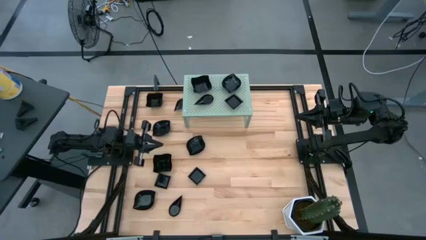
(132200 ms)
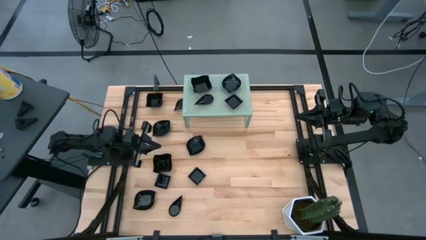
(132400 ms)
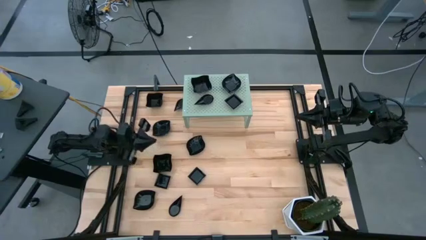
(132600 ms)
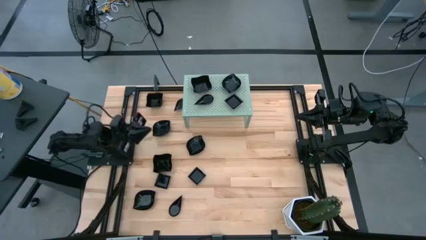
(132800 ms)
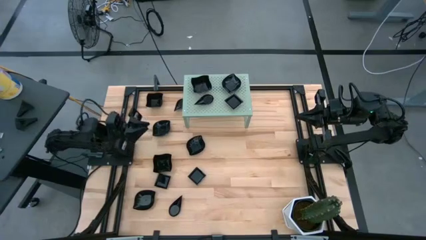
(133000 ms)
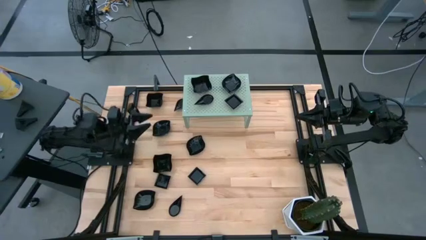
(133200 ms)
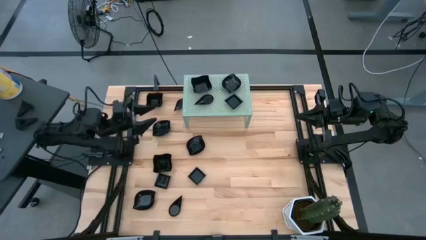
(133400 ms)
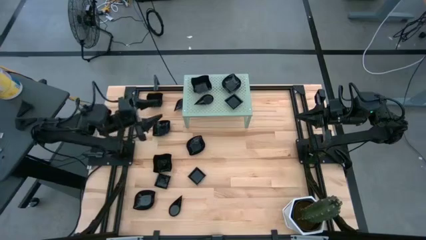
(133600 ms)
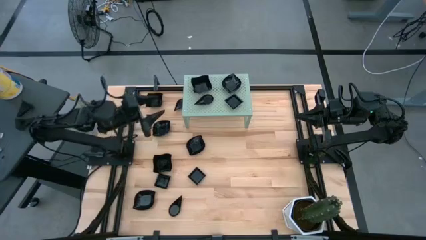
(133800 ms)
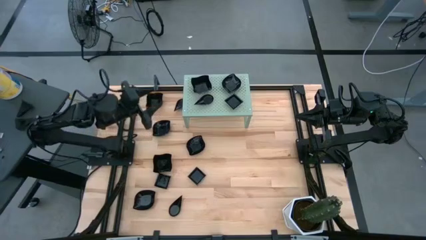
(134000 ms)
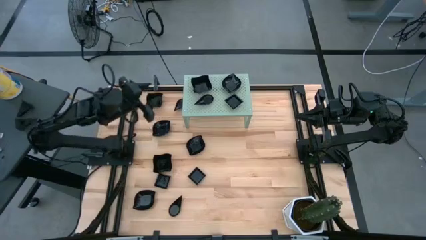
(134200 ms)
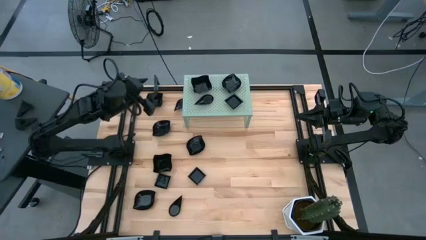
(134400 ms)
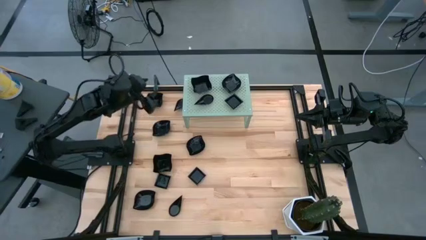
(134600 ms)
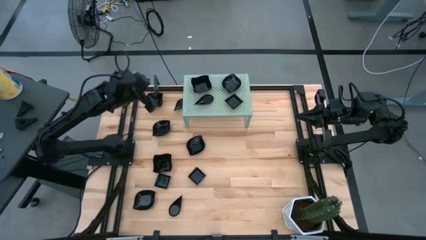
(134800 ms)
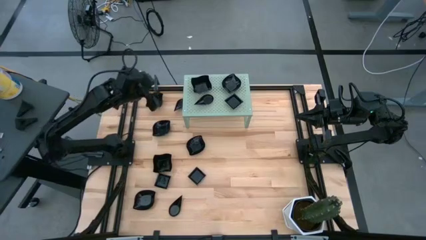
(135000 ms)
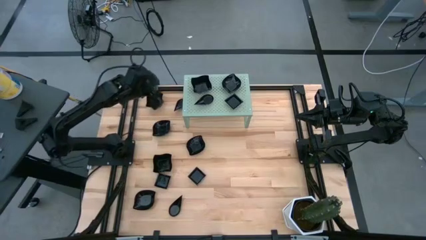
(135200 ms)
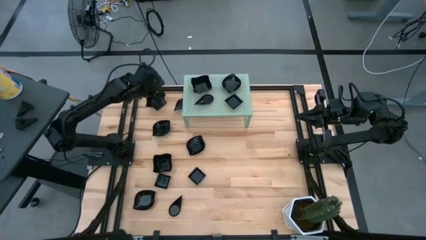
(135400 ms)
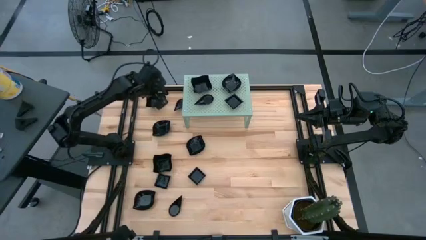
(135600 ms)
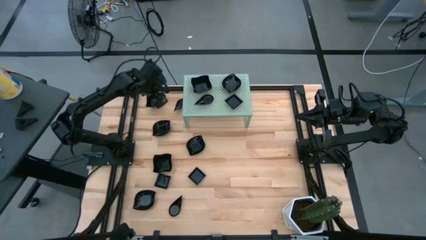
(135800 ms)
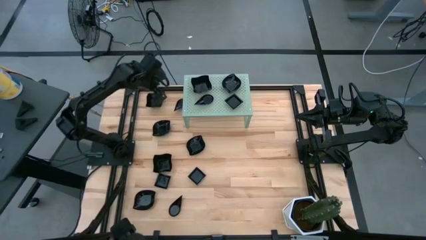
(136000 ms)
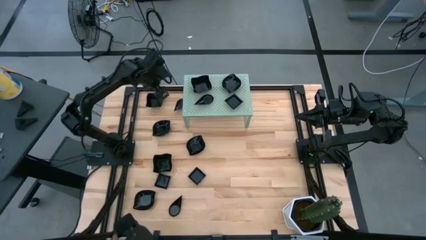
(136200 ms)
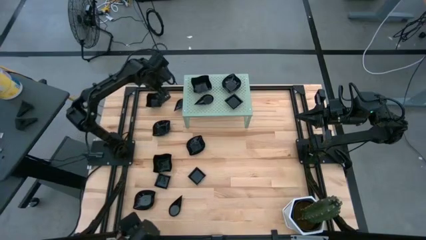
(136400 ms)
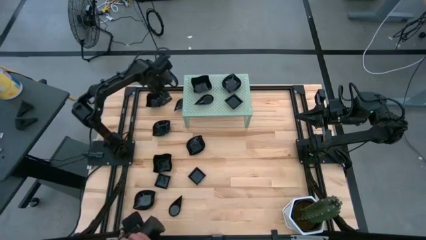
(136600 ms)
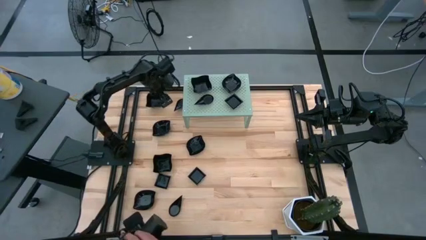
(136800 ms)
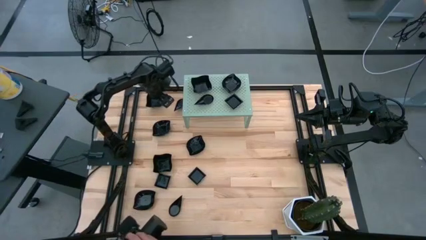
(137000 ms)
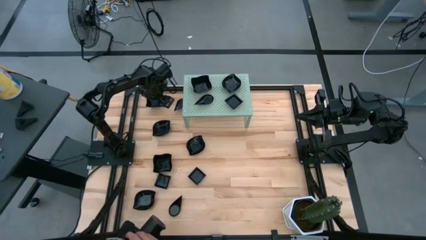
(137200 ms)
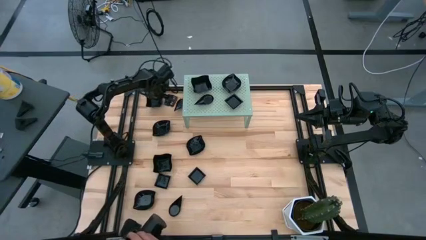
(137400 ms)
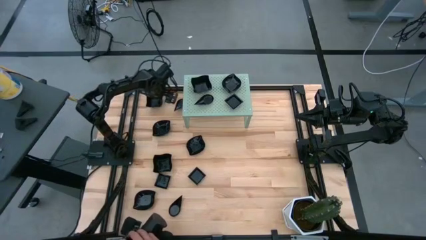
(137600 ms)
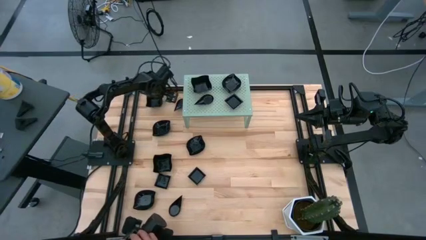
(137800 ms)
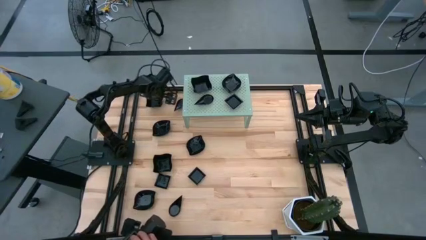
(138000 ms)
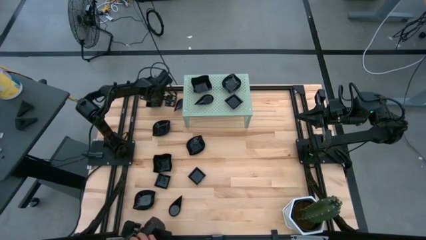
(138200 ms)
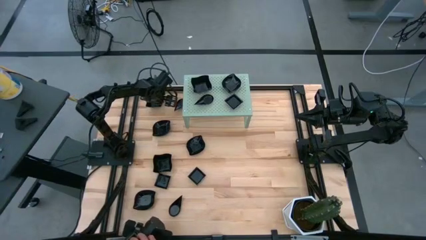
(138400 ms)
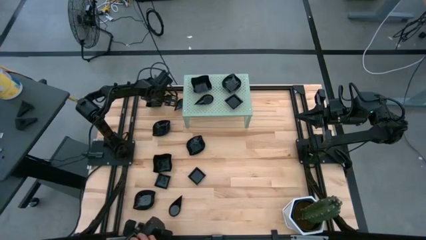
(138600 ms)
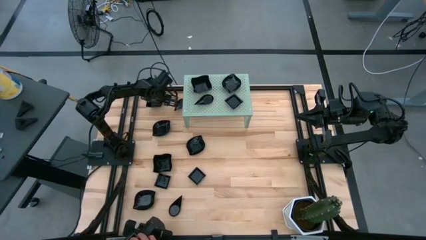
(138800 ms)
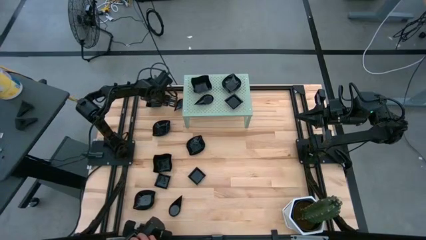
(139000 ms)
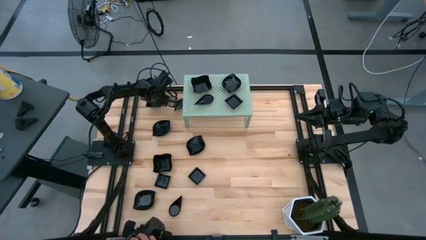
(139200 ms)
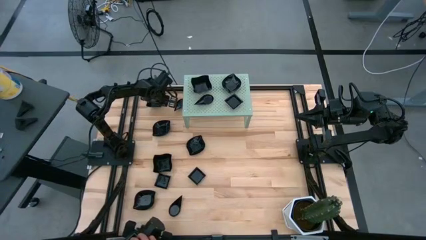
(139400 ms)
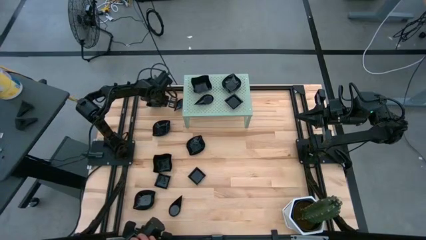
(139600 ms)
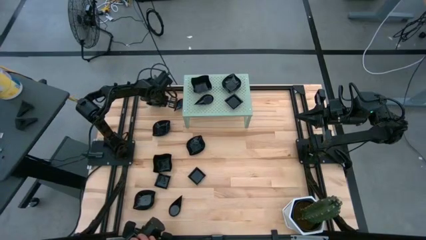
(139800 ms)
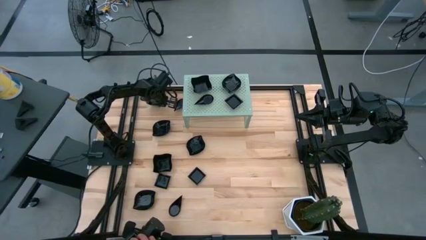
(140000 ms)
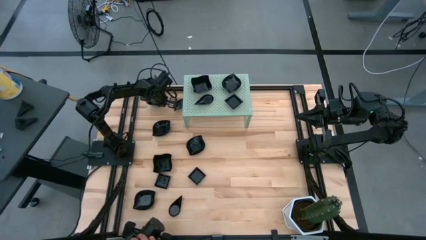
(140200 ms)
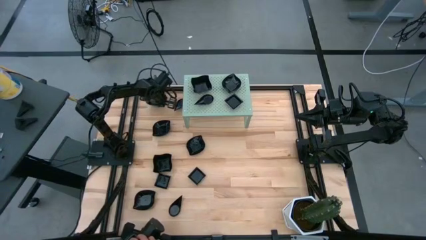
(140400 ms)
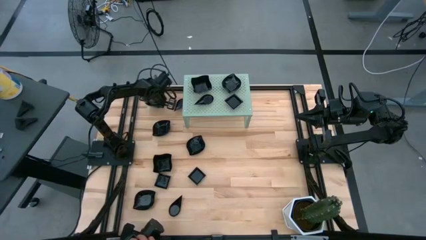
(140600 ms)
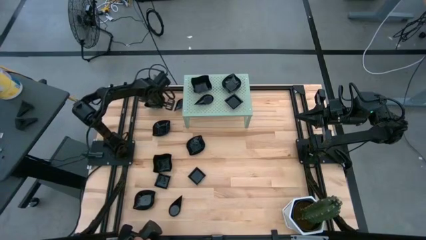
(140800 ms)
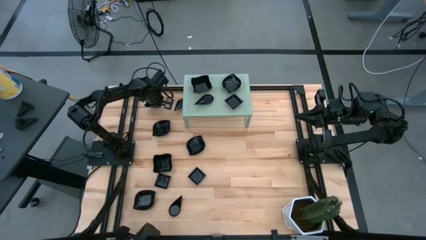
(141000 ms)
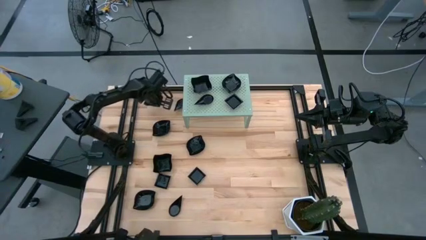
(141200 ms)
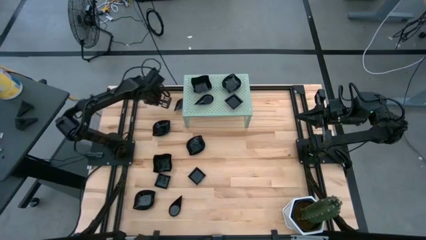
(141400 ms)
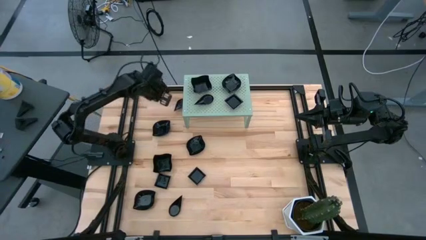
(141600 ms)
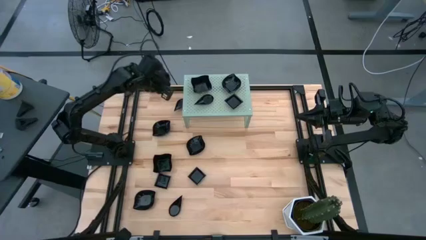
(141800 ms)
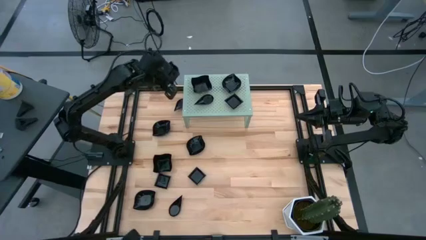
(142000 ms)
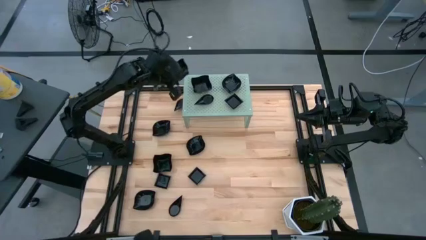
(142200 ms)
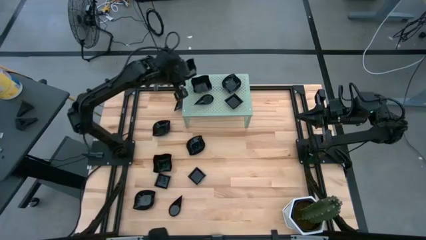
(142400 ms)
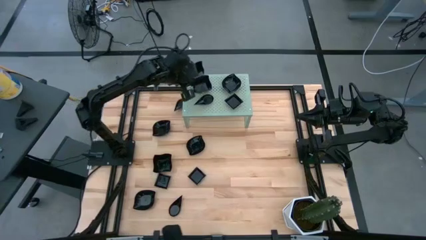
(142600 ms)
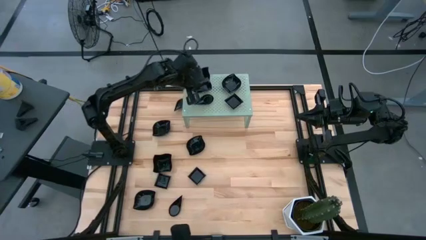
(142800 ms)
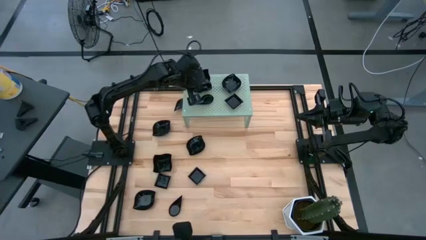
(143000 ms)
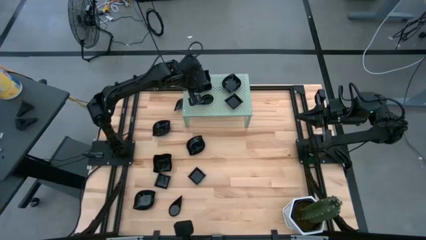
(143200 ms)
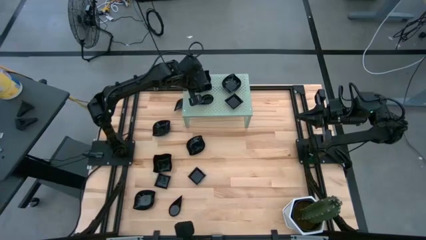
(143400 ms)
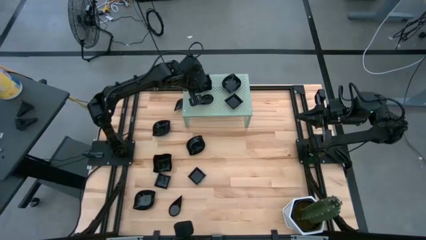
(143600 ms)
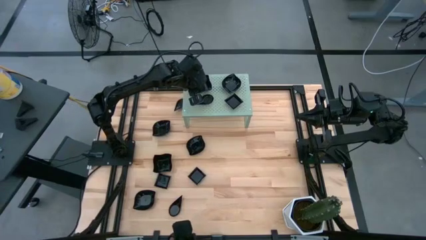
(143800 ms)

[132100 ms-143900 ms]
Task: Pick & Place Mini shaped plates
Stack the distorted square plate on top of the distorted square plate on the shelf

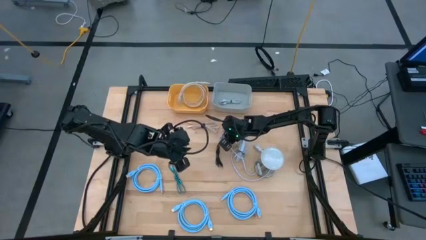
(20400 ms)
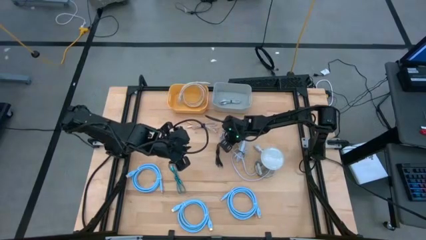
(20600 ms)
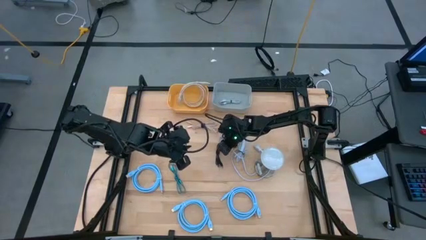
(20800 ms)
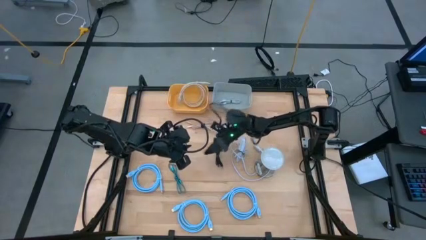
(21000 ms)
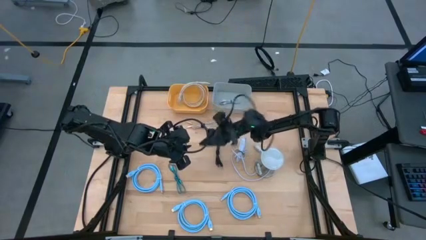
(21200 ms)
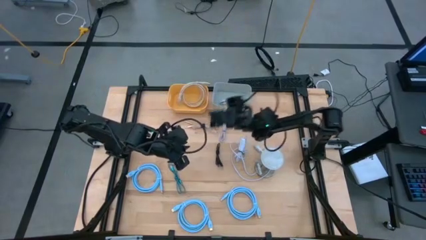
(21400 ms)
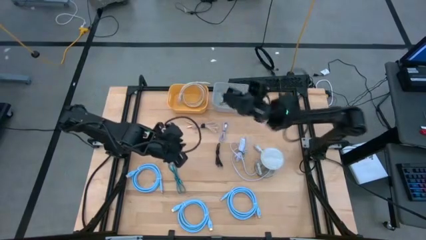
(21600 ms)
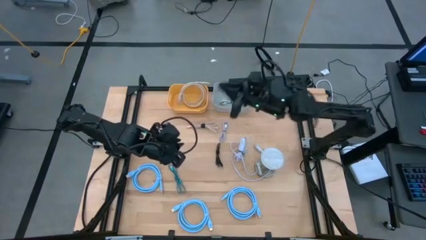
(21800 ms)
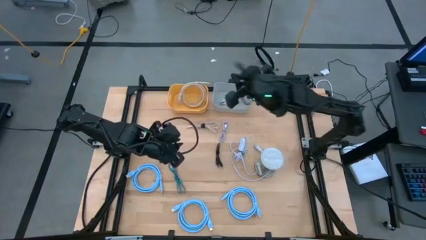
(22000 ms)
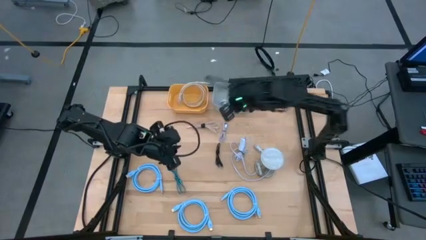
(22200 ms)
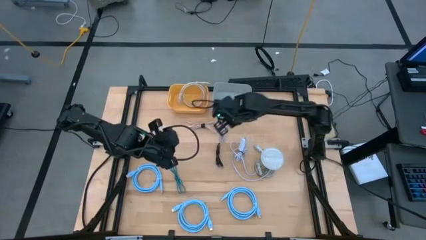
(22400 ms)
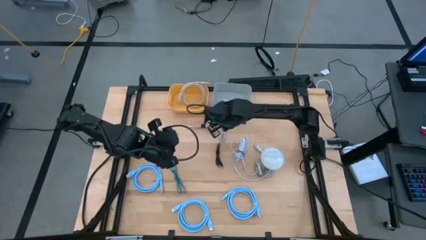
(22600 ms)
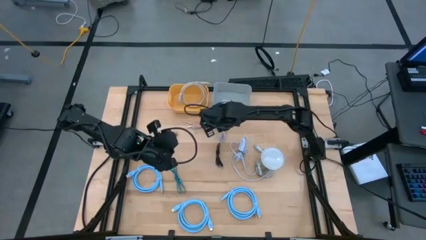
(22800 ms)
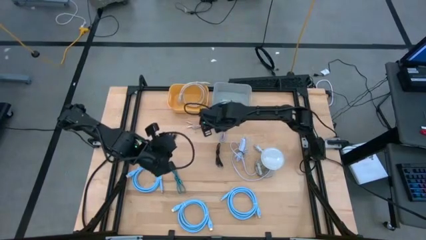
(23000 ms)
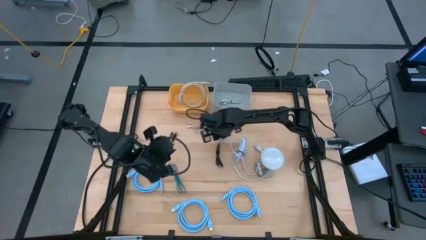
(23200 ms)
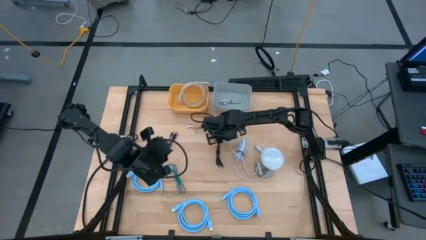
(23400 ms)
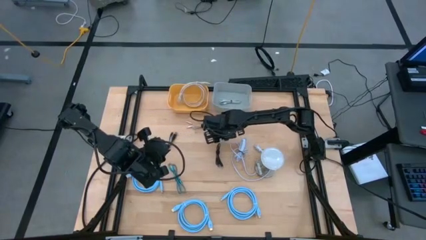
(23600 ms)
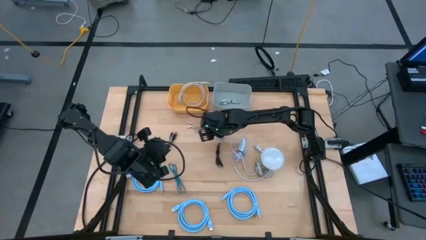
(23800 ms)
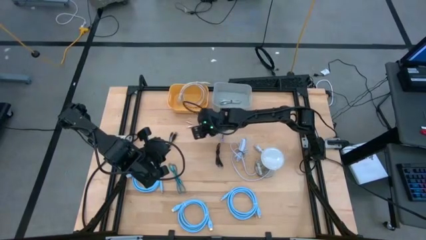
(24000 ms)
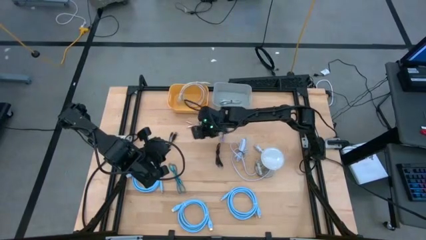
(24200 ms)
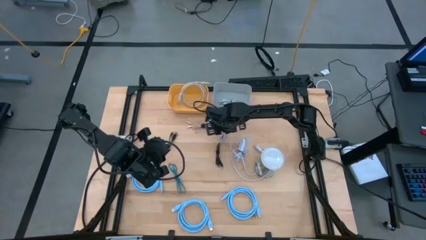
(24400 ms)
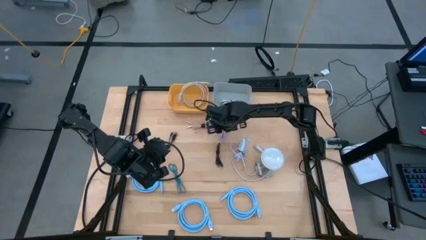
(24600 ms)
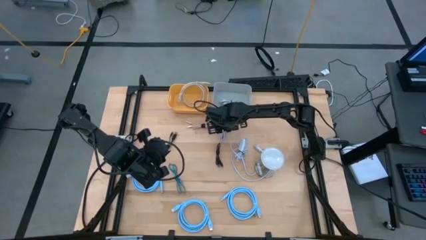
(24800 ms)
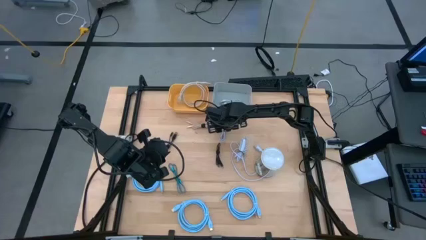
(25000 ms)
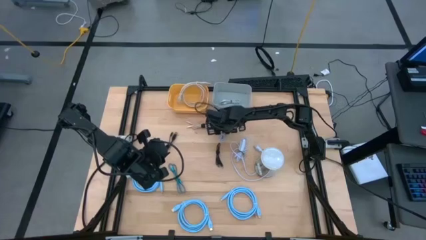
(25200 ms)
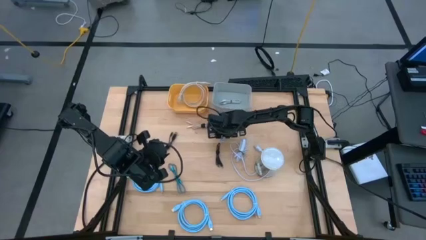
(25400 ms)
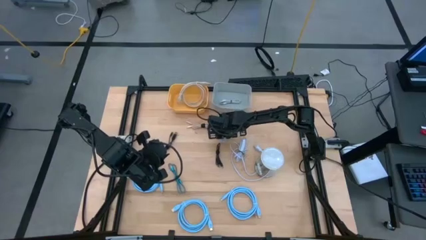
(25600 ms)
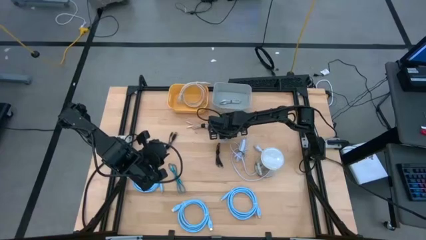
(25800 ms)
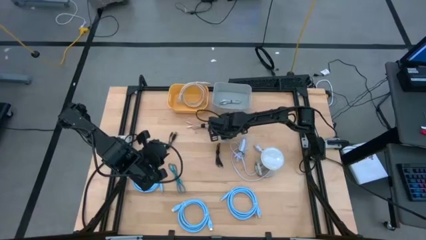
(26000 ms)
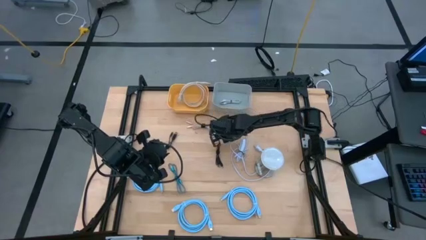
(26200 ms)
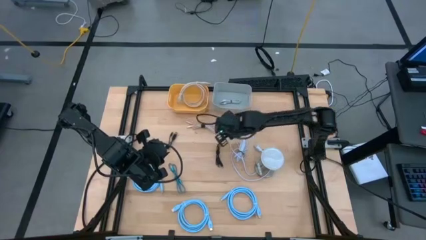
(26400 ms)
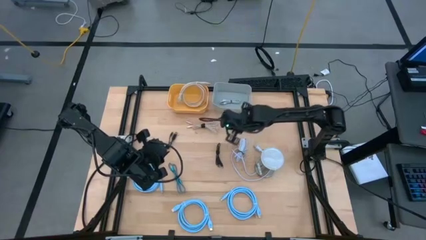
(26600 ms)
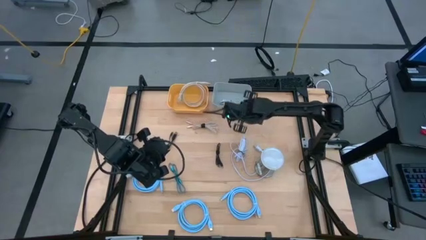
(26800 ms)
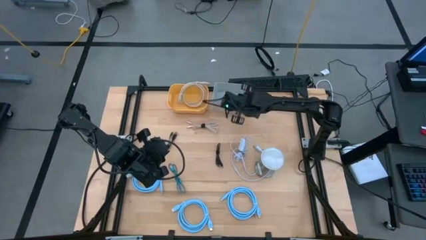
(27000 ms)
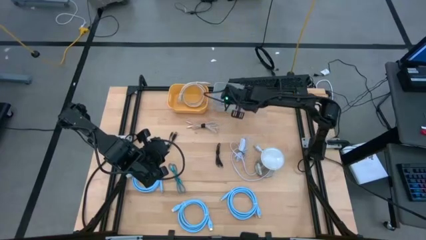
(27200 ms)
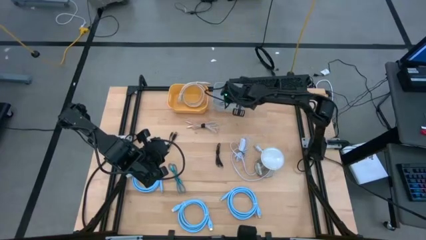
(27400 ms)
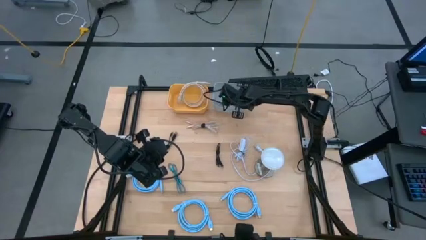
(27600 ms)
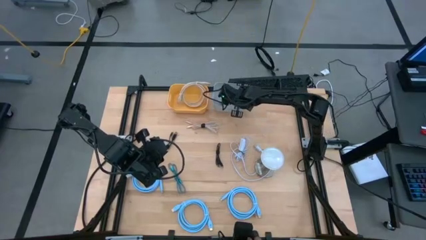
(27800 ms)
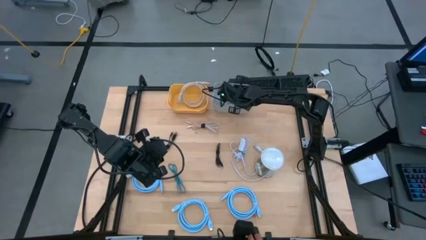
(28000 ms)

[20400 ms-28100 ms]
Task: Pick & Place USB Port
Put the purple charger cable into the gray bin
